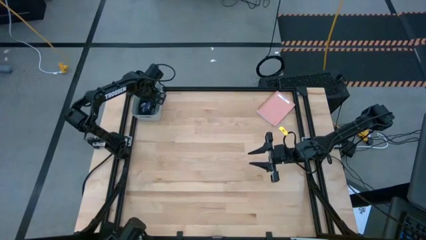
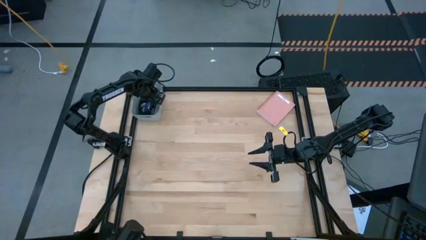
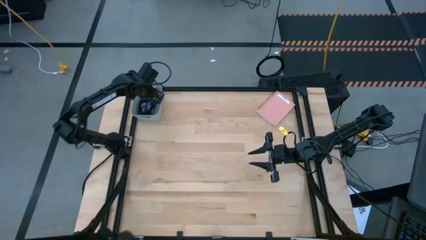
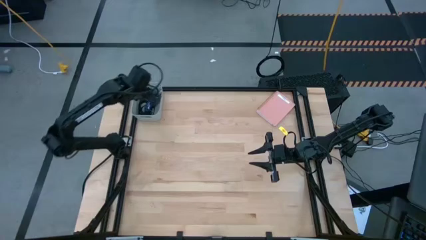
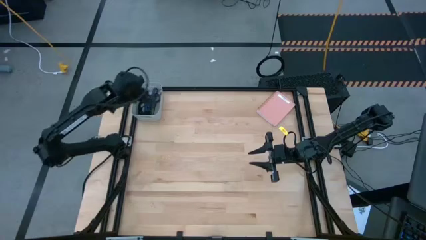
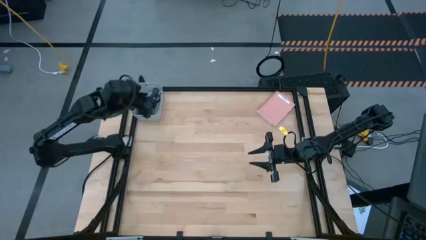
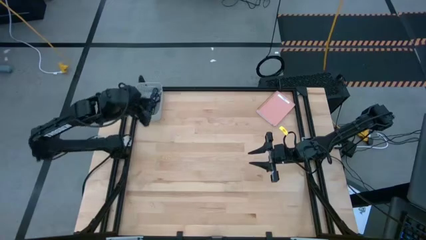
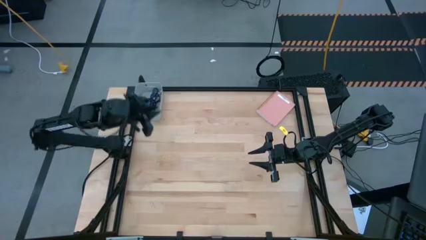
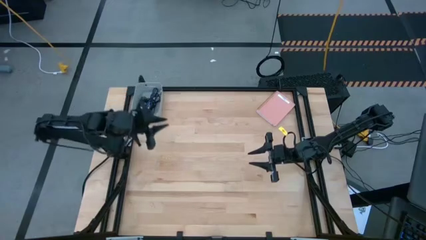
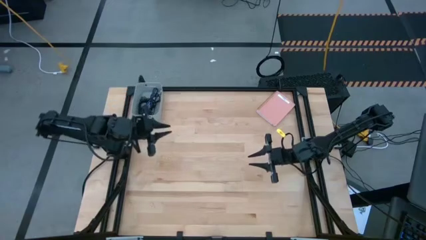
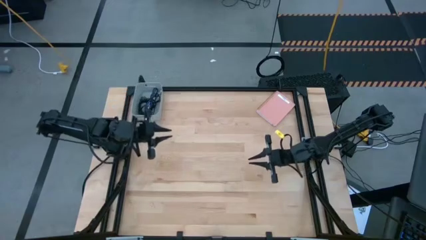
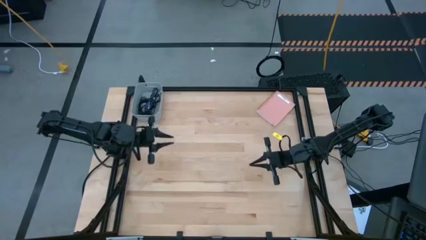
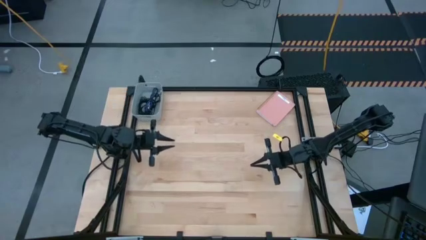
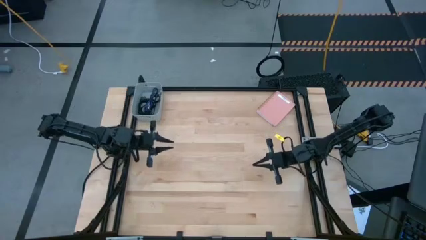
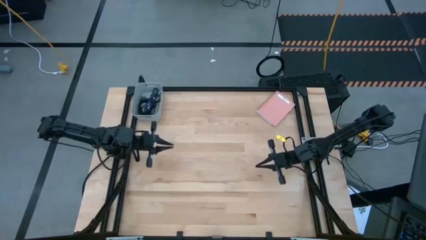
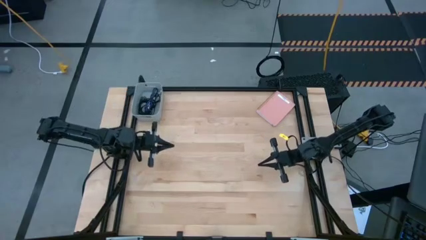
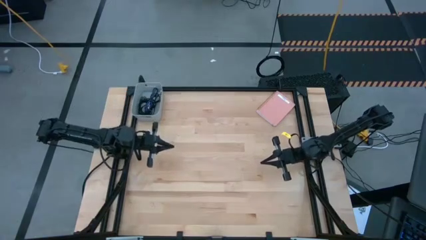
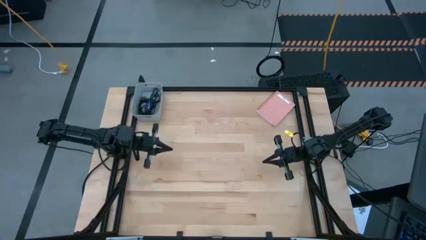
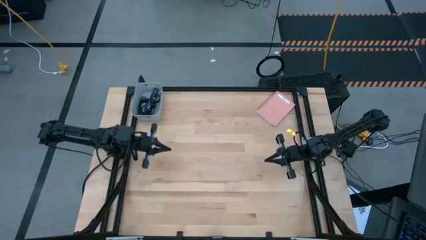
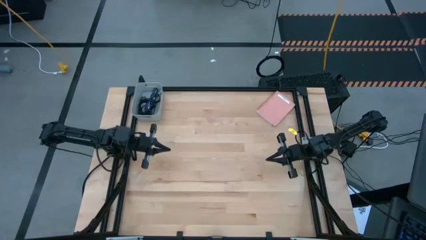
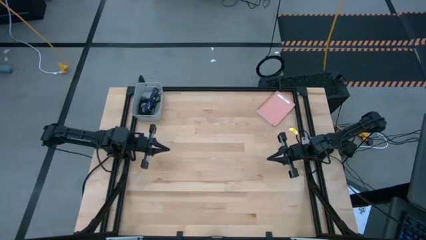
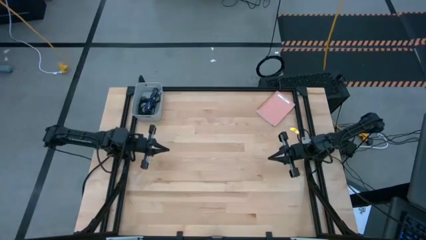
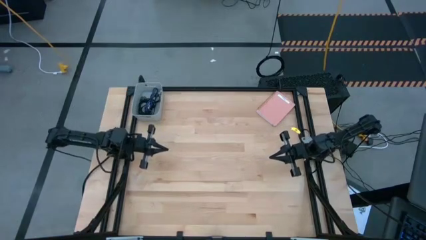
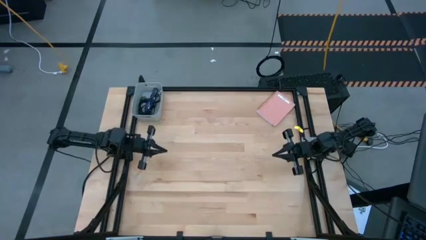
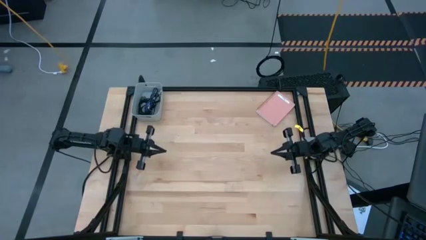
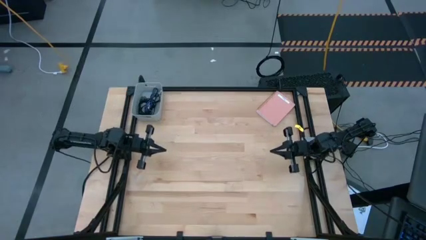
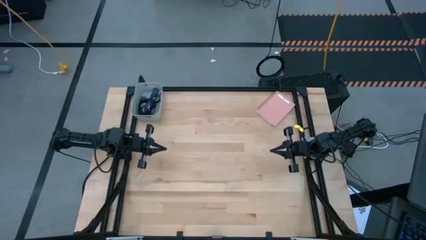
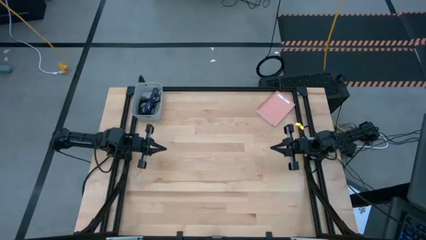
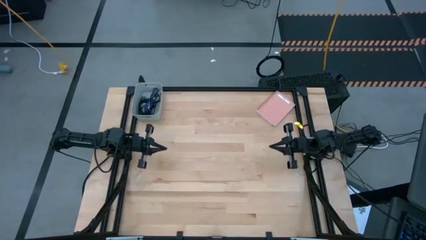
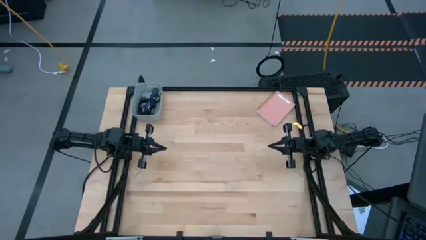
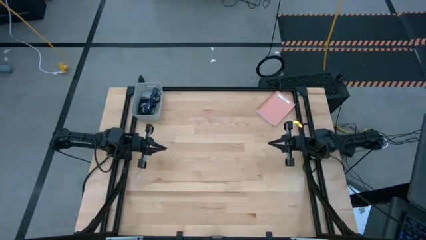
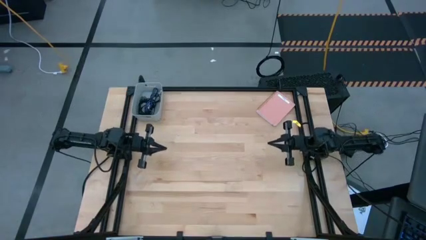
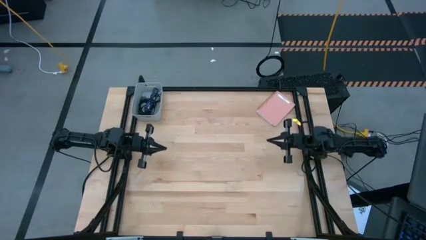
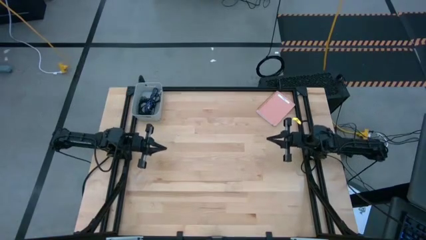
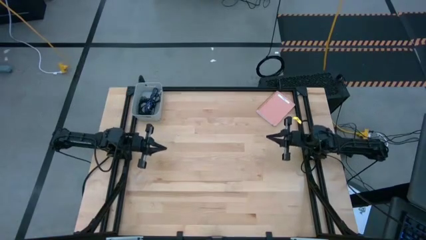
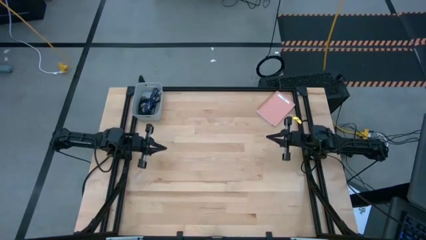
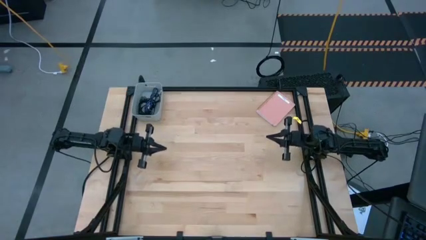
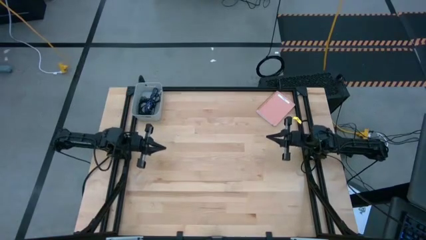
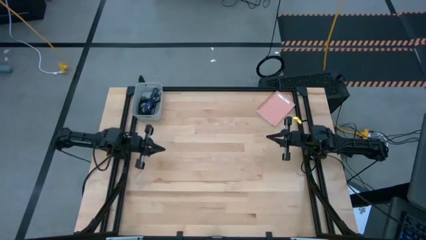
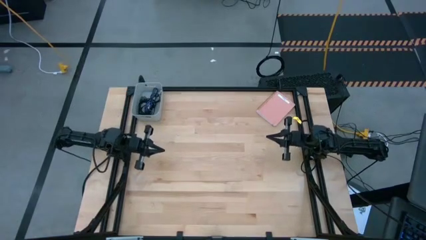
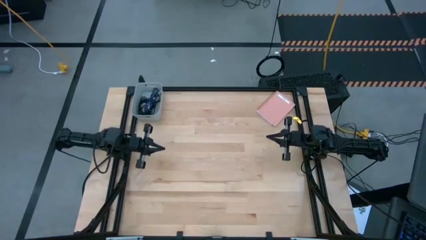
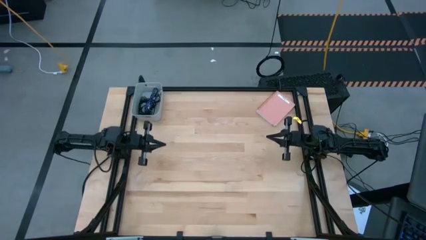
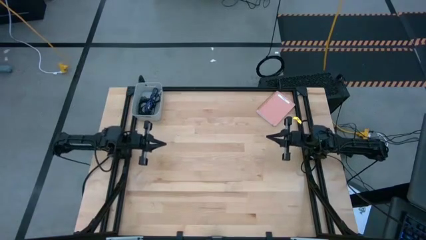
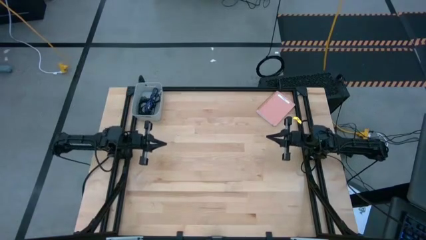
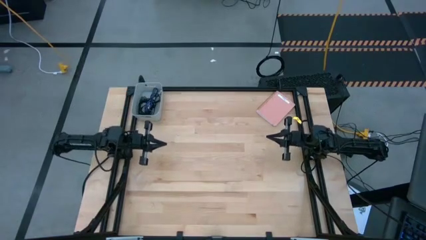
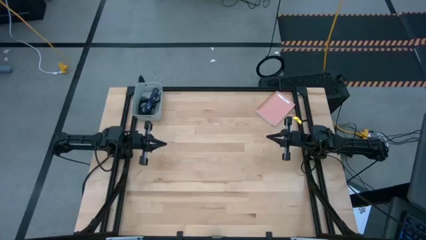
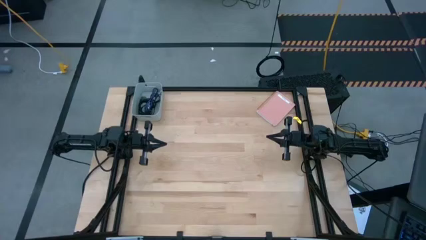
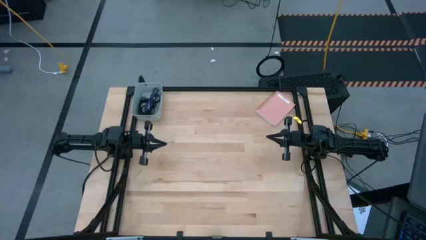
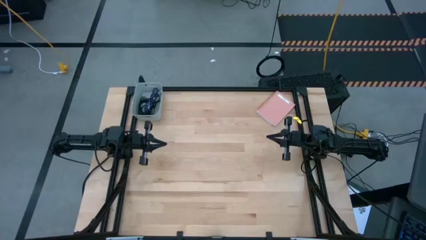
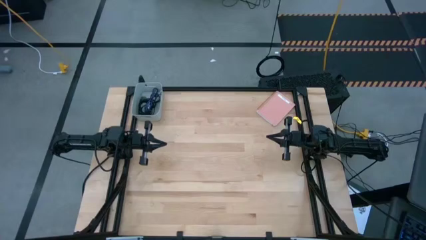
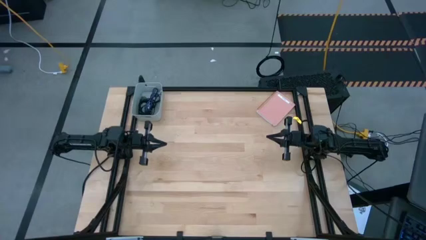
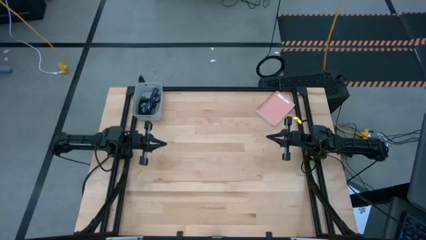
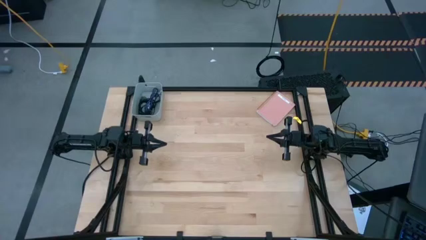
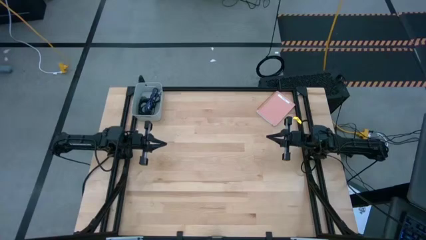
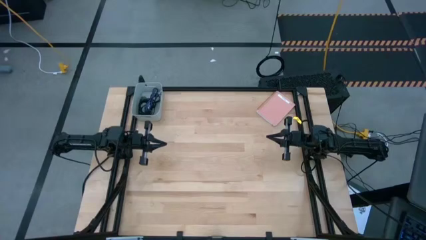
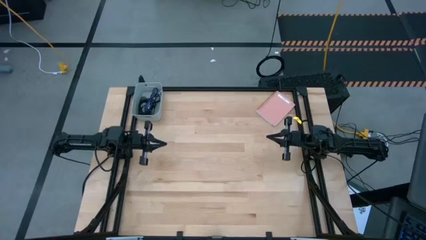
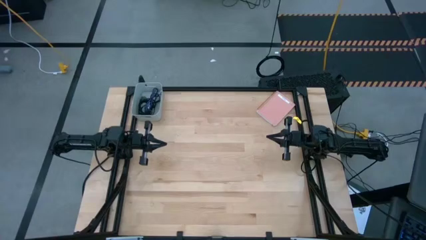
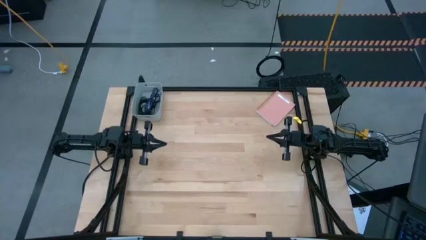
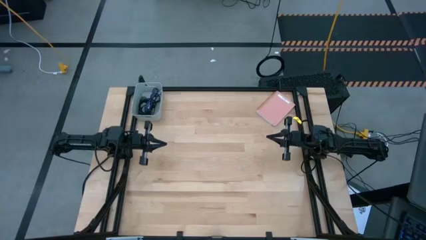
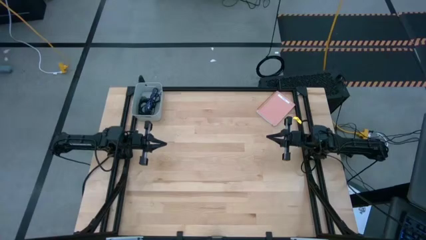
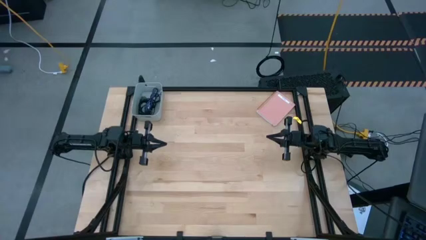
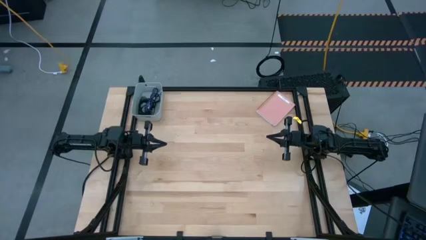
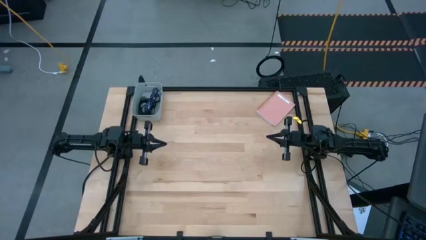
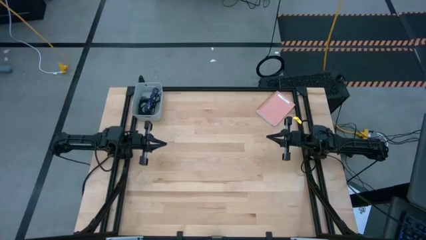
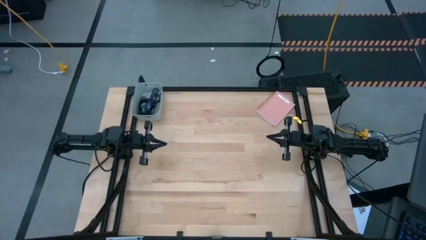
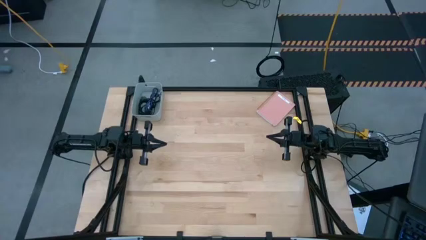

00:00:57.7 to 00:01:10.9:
Task: Pick and place USB-C Cables
Return to Home Position
